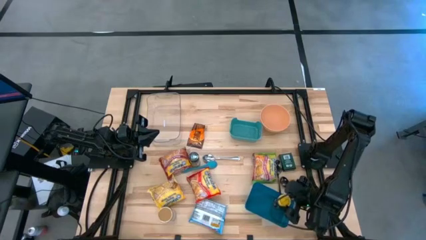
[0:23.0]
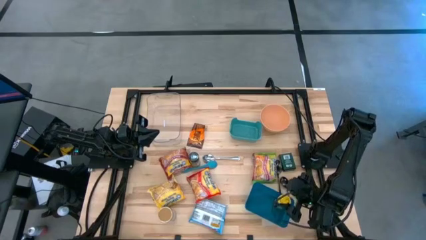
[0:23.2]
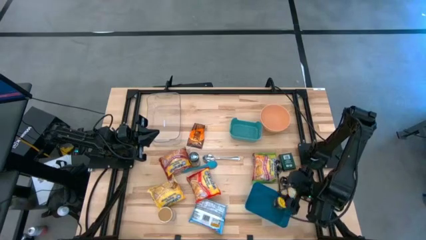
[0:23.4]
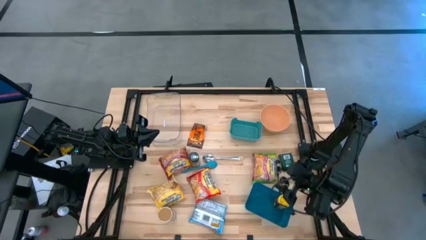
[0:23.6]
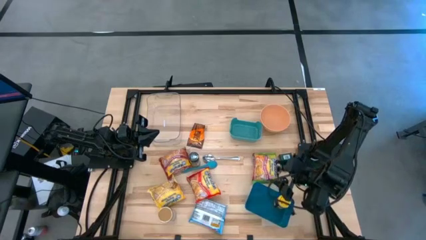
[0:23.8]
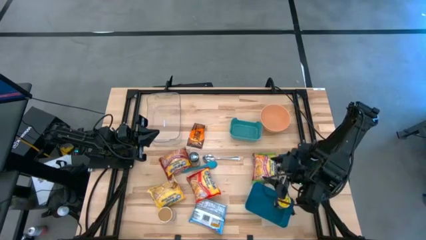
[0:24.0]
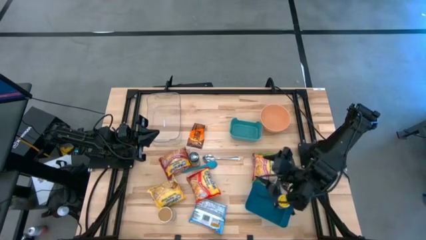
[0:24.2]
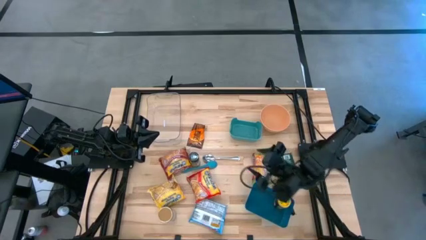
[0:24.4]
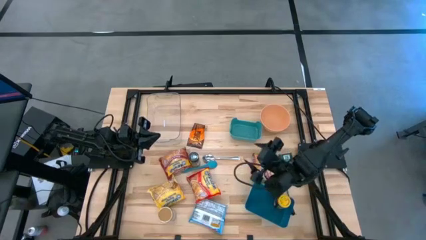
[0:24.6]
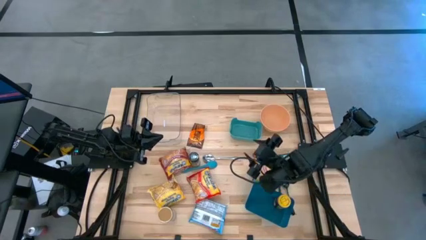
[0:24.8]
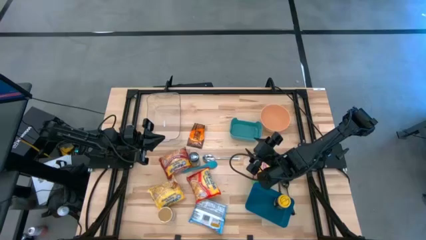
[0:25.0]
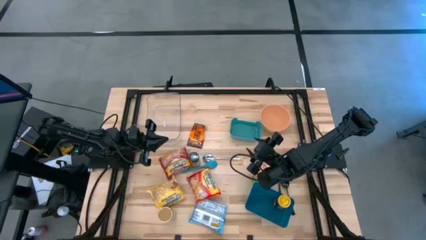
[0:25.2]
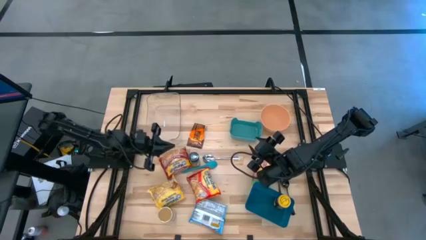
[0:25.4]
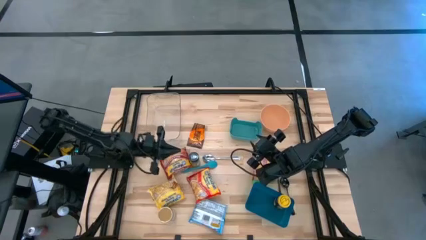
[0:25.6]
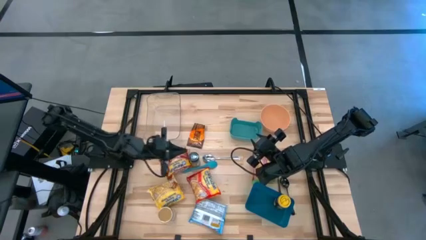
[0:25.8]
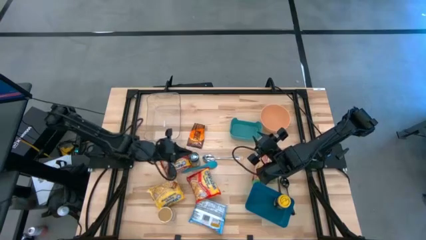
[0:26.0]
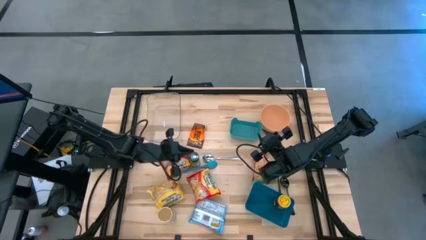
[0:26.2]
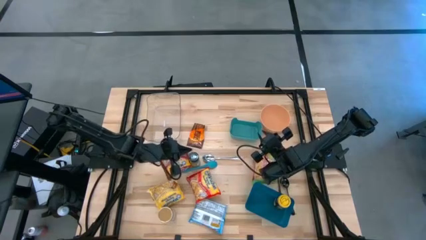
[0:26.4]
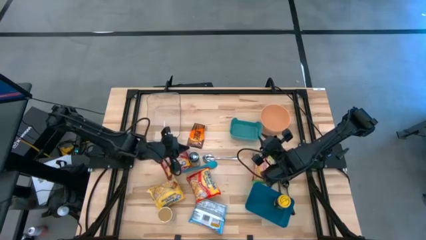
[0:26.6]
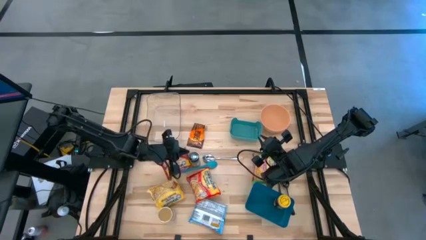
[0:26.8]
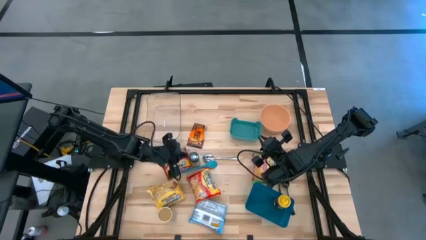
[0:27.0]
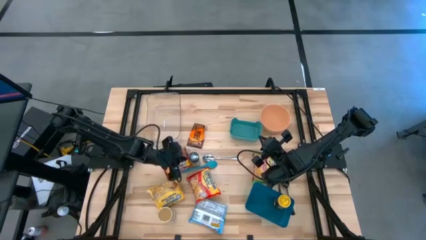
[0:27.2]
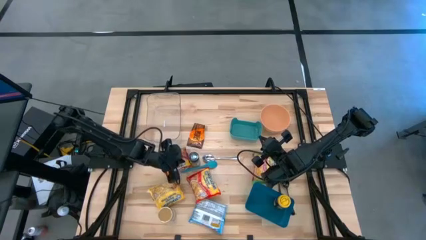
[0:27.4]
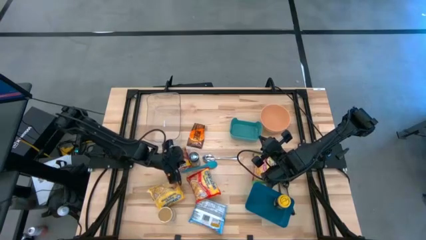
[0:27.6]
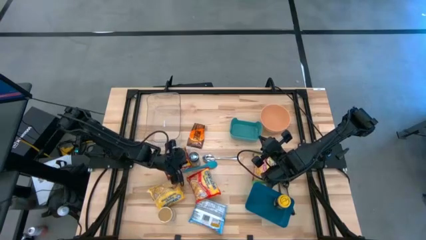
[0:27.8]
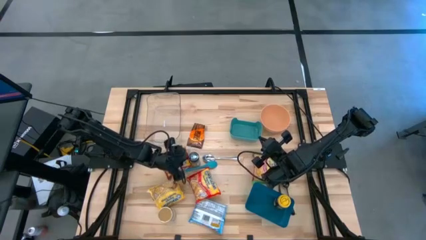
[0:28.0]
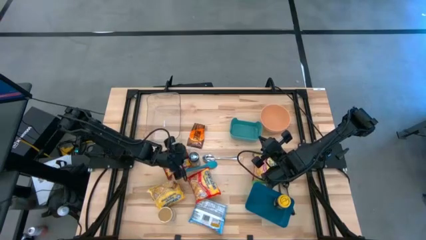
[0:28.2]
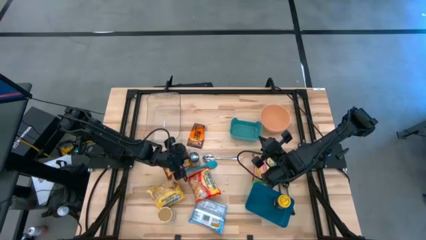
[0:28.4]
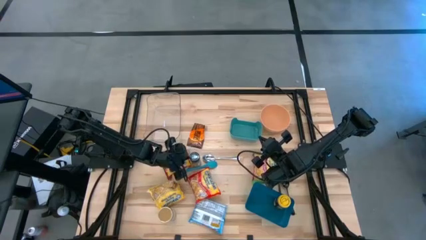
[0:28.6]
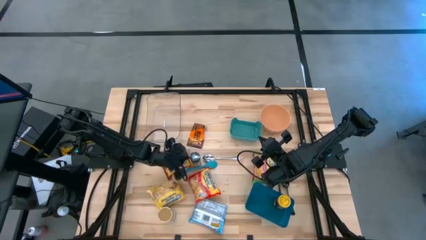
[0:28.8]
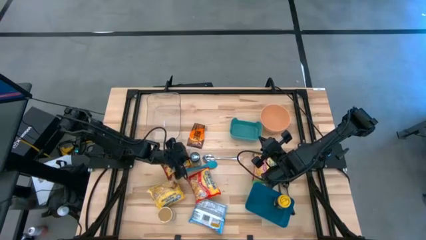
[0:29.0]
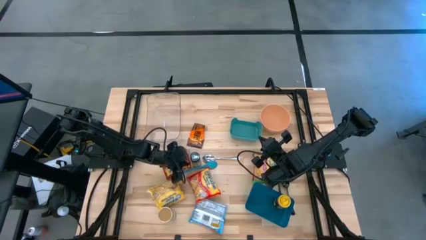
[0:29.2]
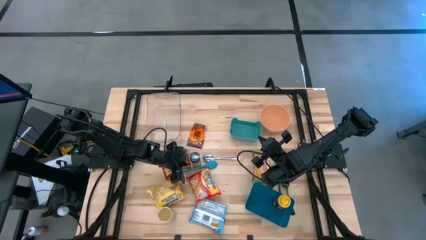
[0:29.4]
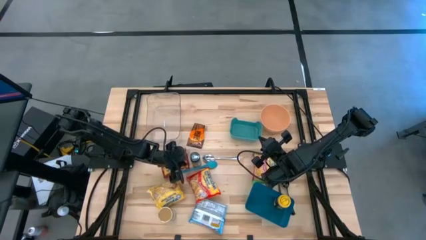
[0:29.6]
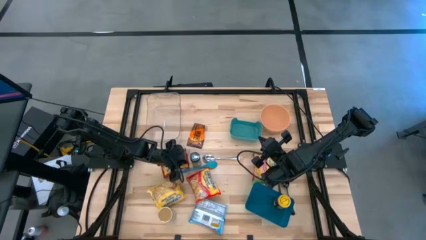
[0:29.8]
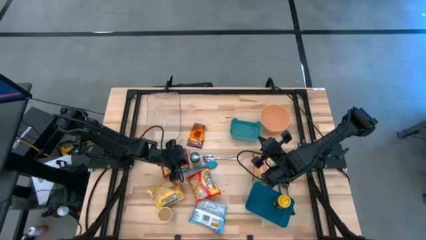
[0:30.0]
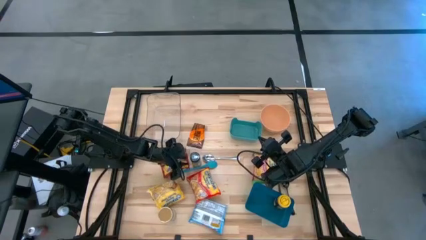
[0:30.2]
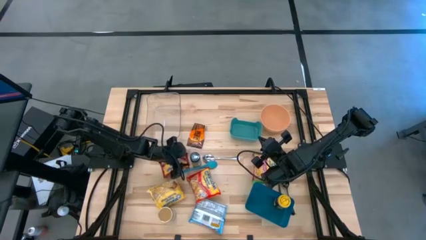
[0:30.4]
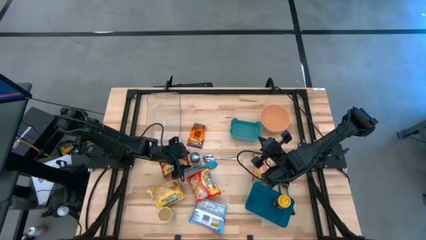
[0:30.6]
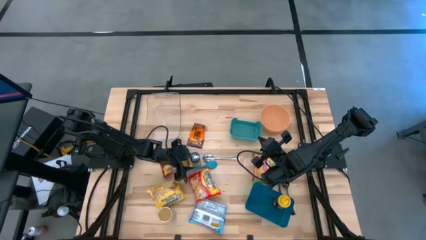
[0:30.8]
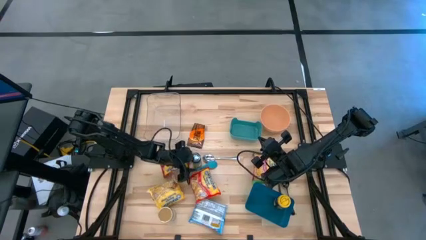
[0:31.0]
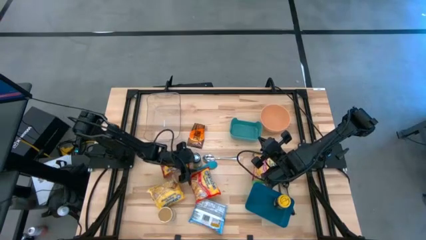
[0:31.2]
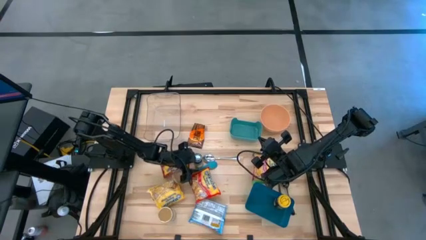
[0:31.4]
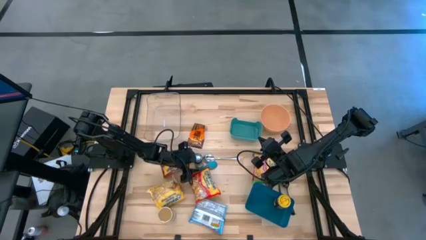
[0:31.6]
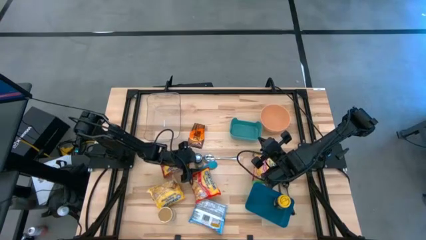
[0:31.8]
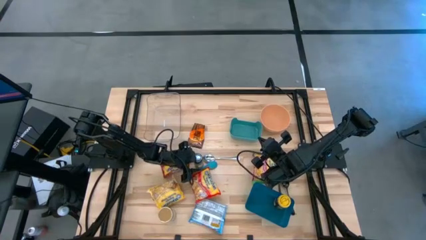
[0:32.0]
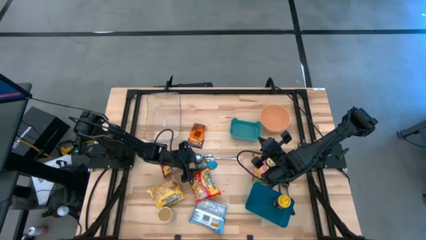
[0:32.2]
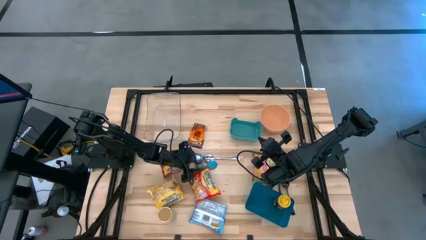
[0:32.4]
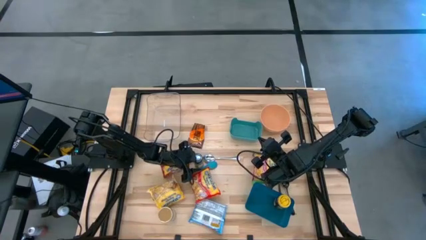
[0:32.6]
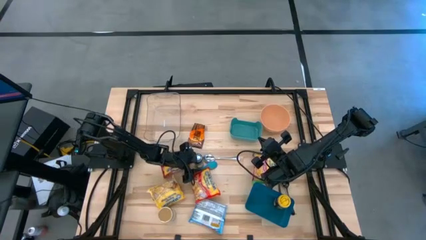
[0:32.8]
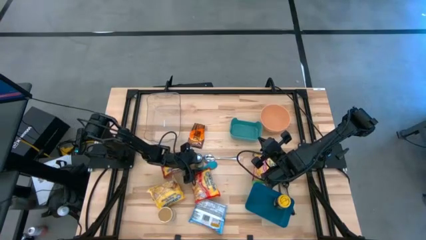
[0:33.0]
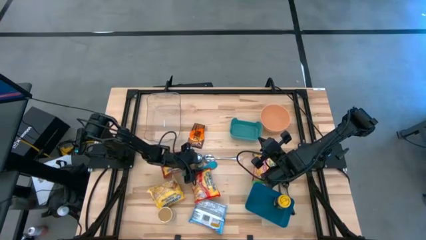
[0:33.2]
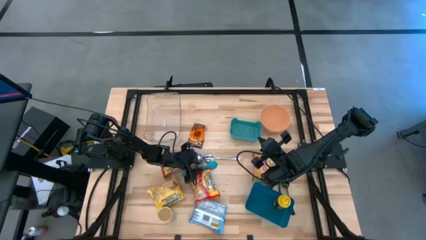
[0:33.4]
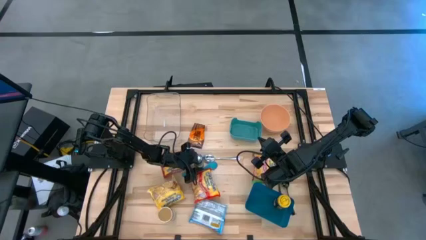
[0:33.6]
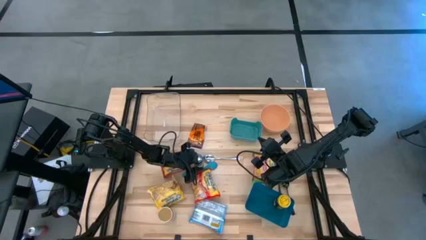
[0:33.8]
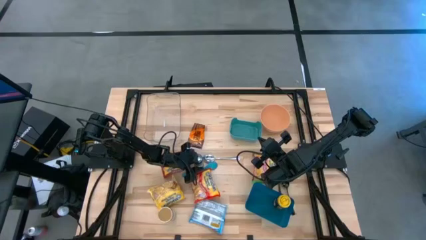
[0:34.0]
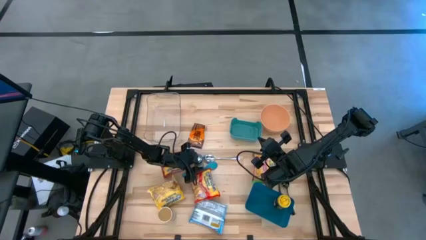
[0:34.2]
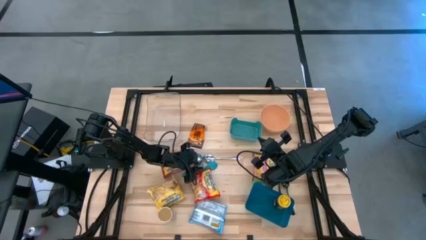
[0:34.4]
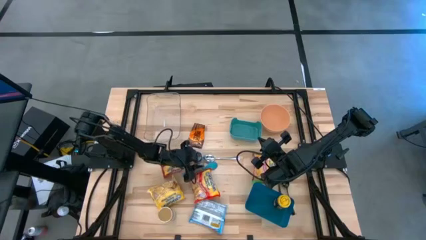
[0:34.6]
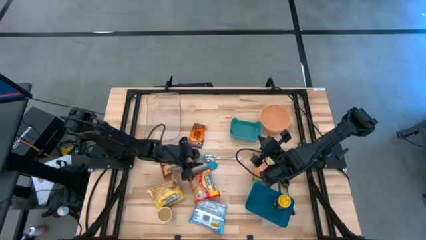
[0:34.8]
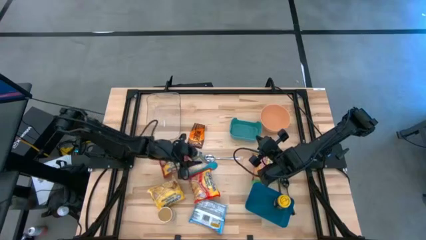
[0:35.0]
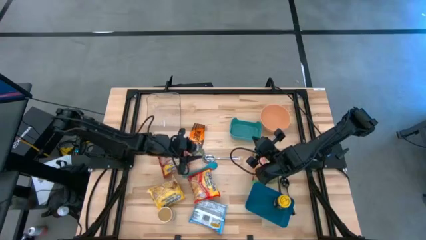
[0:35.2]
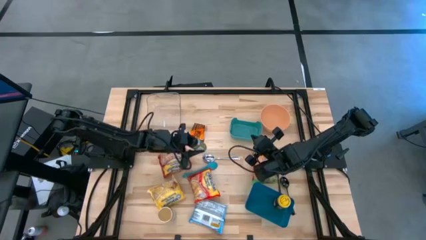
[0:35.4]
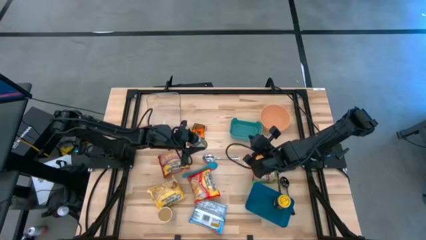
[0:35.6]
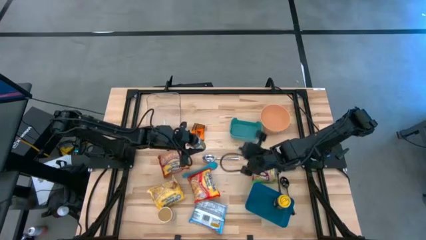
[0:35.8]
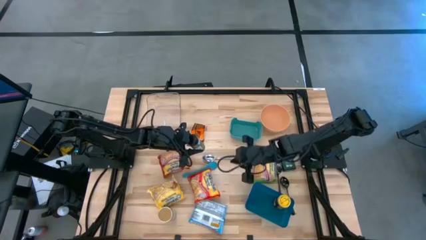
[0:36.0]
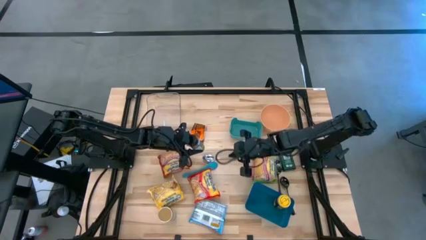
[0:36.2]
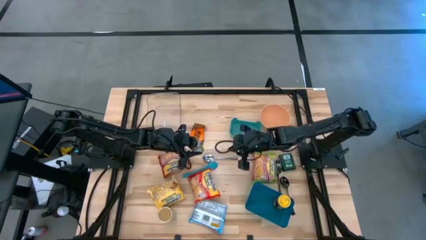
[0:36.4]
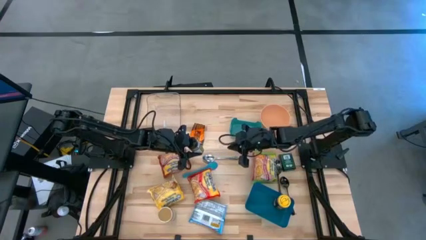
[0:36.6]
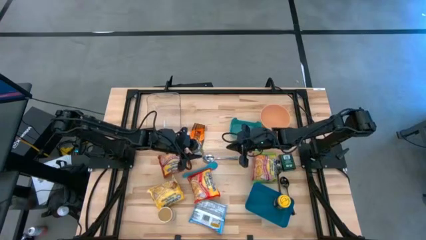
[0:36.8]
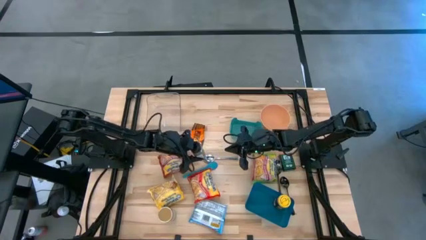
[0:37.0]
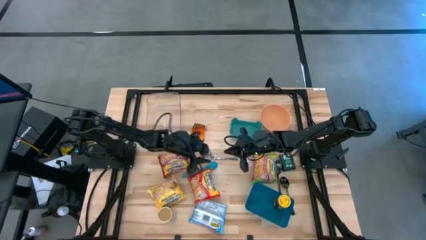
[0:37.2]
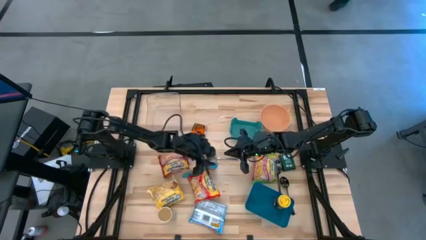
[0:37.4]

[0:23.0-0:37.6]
Task: Pick & Place Food Item
Put the black seasoning bottle into the blue bin

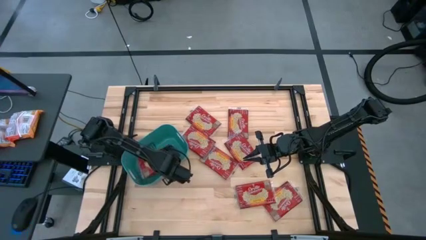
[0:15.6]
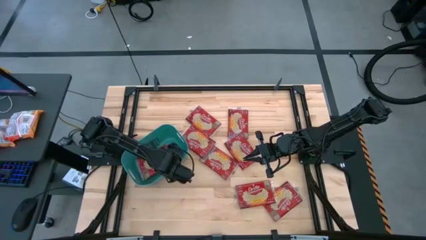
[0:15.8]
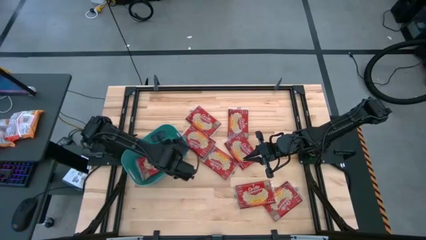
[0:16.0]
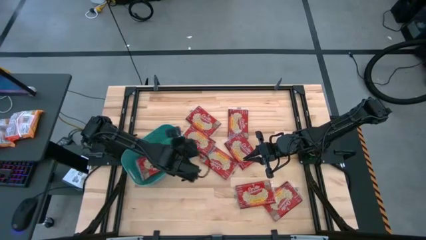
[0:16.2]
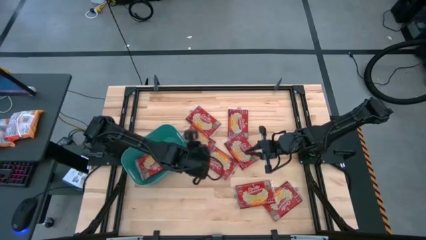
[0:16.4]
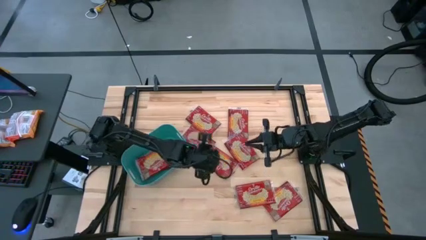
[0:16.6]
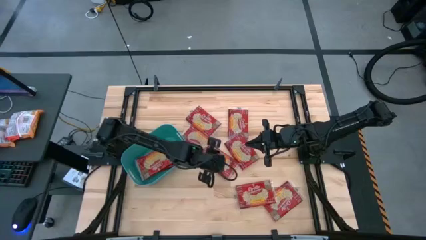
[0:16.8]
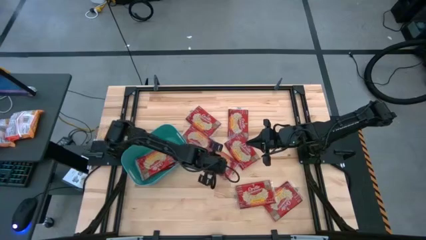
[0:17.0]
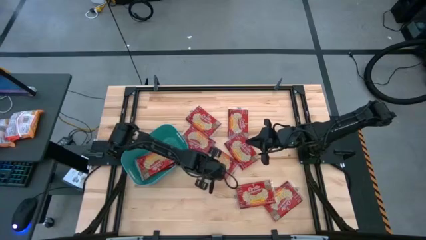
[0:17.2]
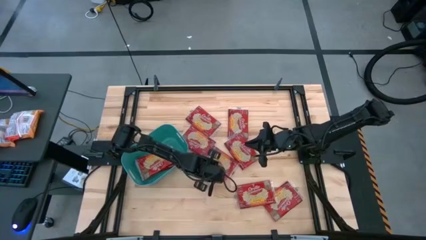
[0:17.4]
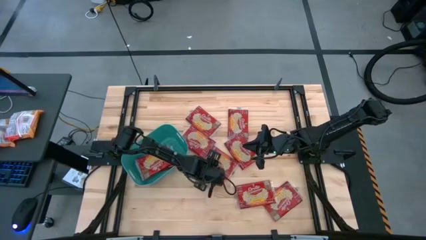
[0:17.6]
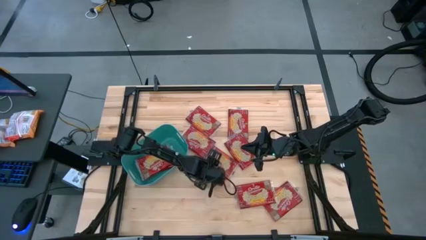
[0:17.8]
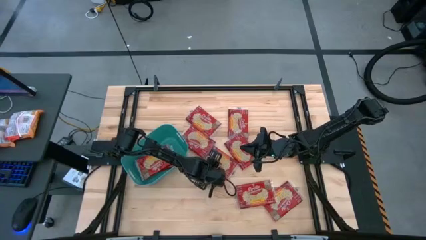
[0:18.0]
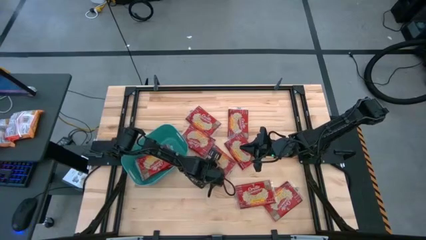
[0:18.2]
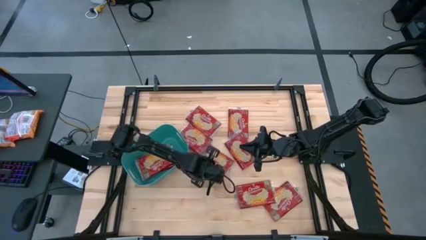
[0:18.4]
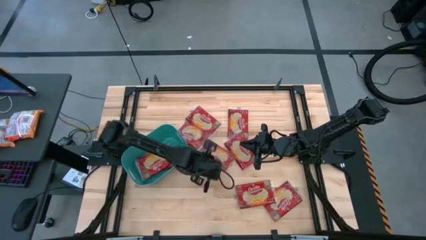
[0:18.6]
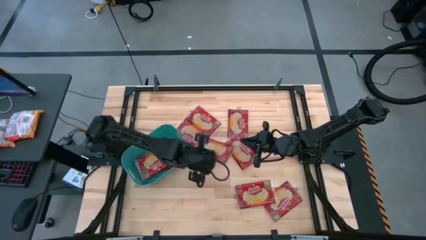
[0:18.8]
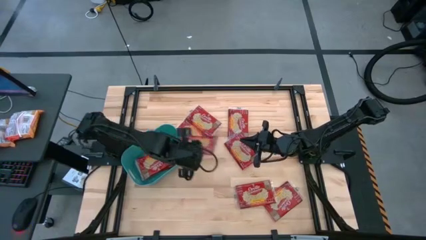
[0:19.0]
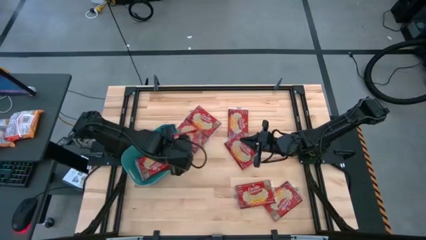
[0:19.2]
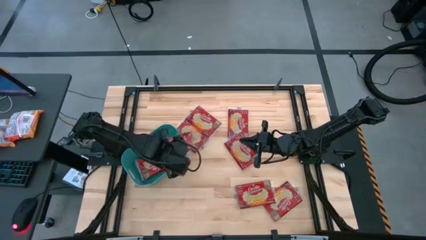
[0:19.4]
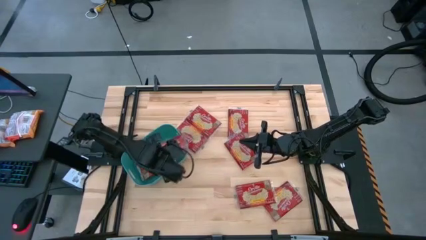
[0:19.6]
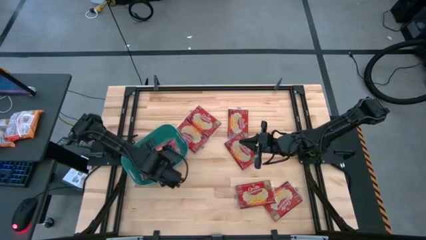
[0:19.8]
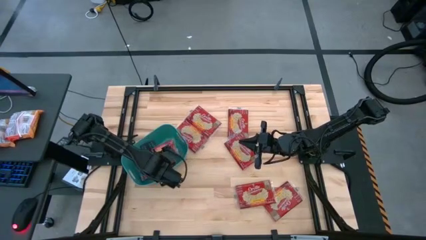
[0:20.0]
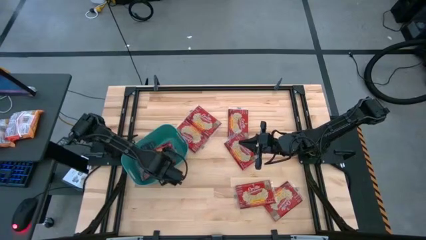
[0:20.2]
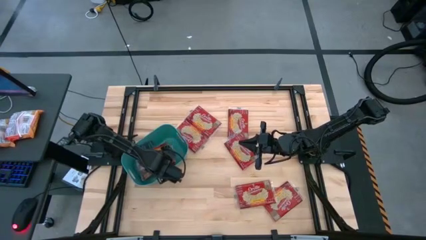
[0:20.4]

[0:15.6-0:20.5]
Task: Sort popcorn bags into baskets
Put the red popcorn bag into the green bin
